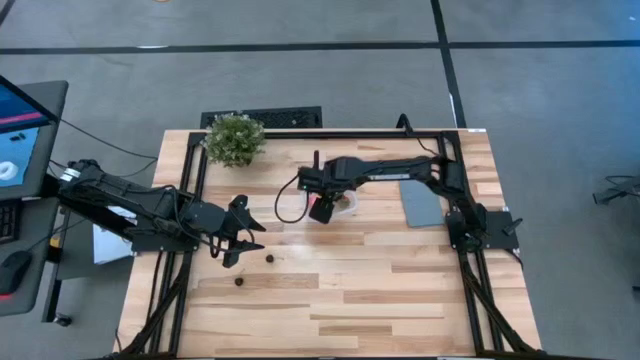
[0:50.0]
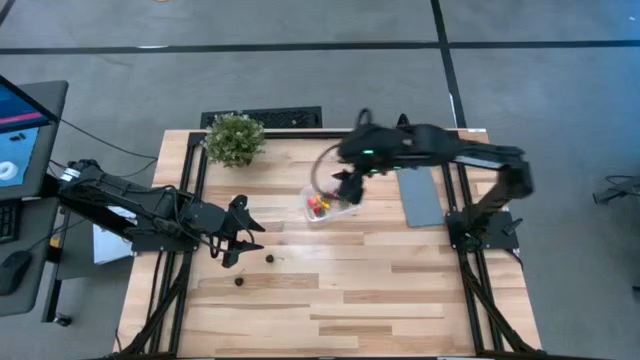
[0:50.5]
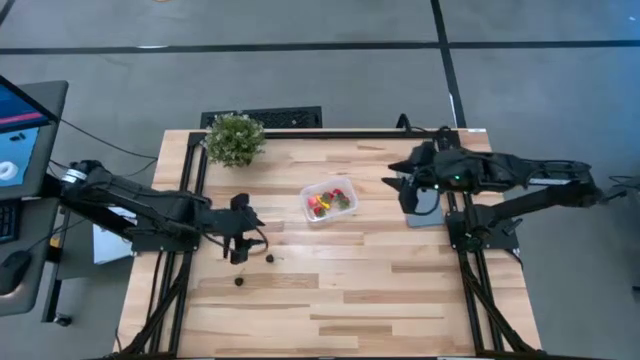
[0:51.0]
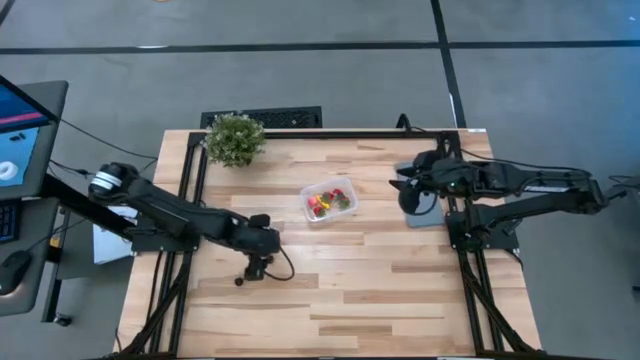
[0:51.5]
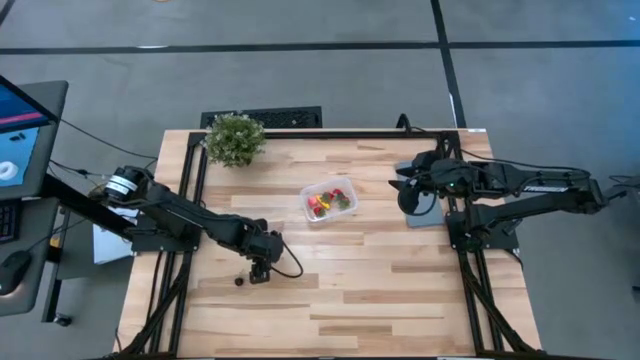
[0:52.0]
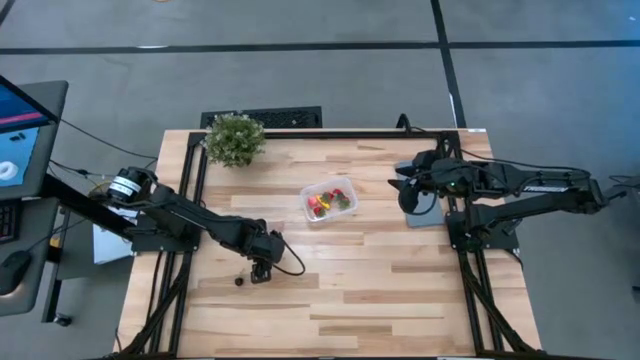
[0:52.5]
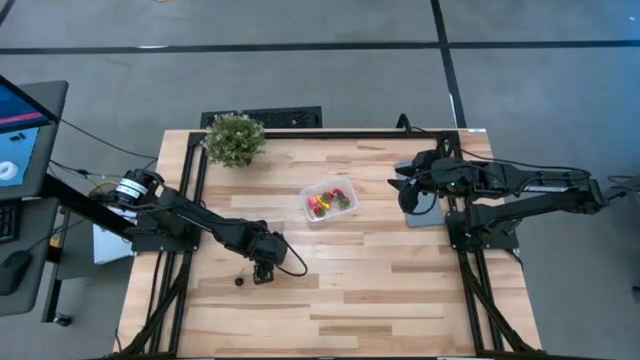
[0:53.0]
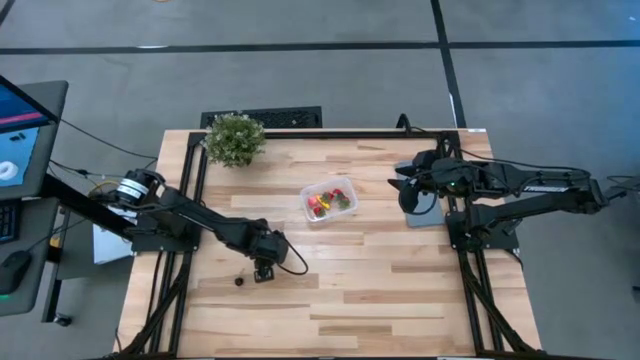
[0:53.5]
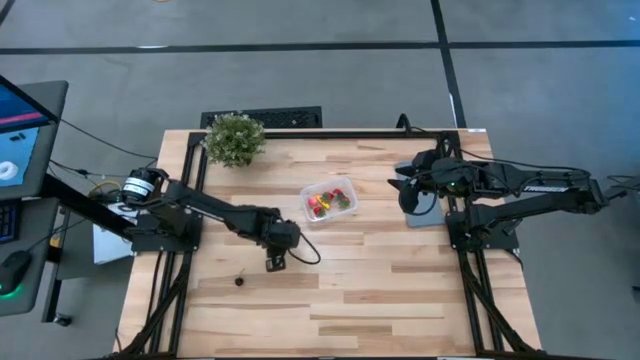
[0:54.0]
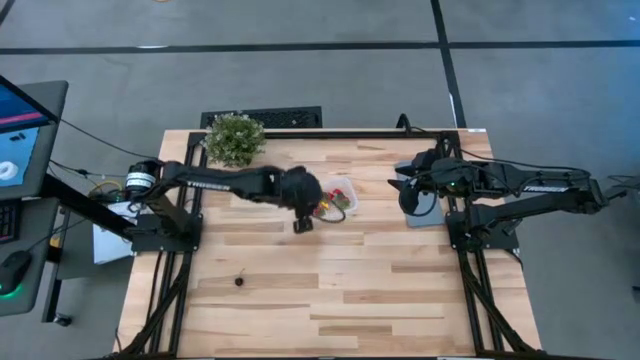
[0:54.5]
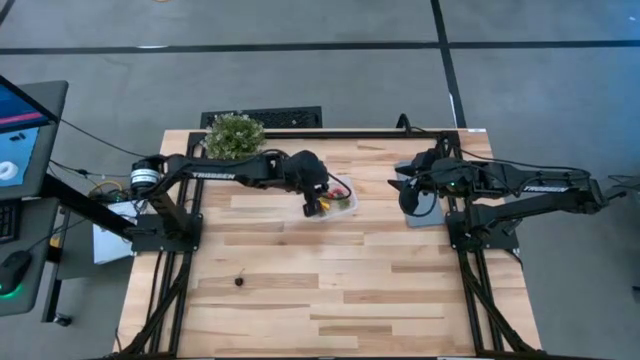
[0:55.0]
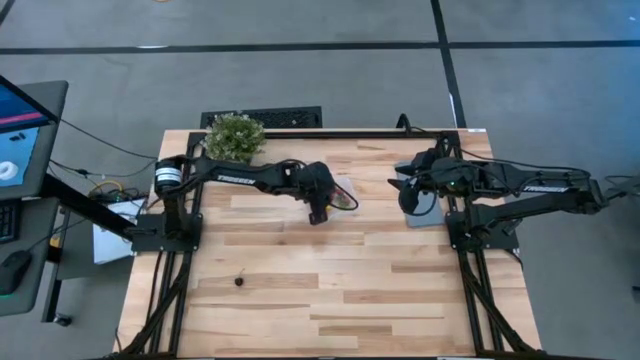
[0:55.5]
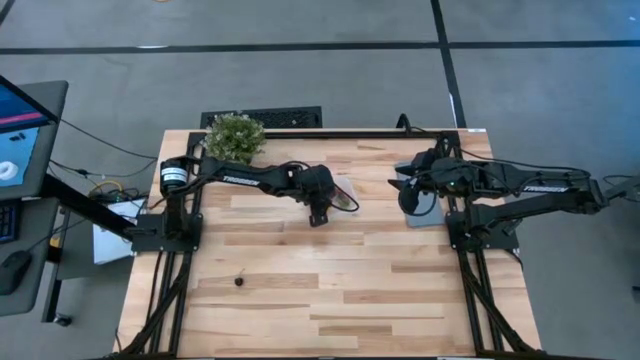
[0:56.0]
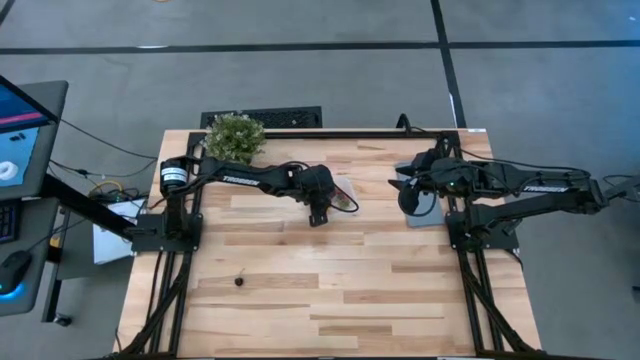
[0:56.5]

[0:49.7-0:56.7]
Task: Pick and placing Produce into tupperware
Put the black cherry into the transparent bin

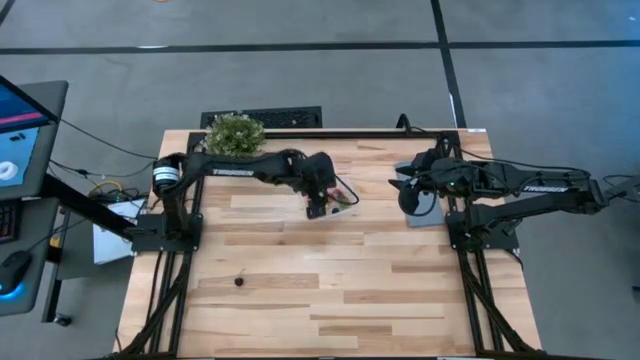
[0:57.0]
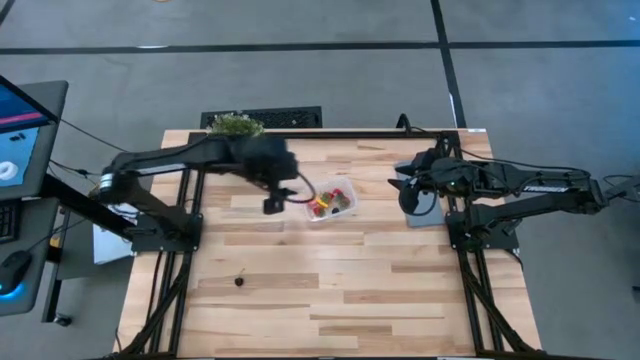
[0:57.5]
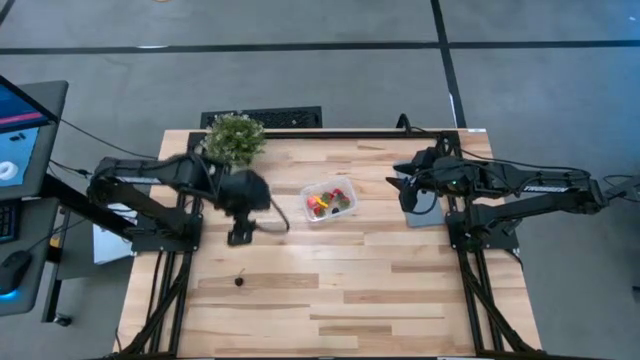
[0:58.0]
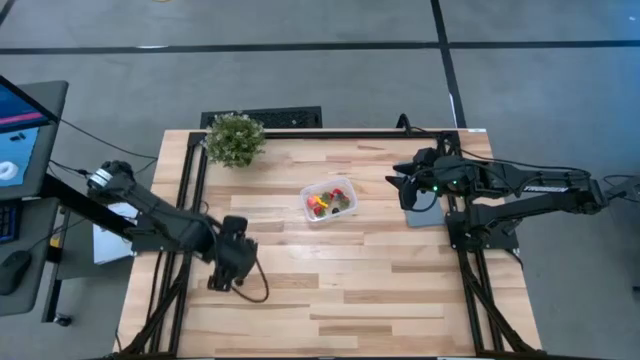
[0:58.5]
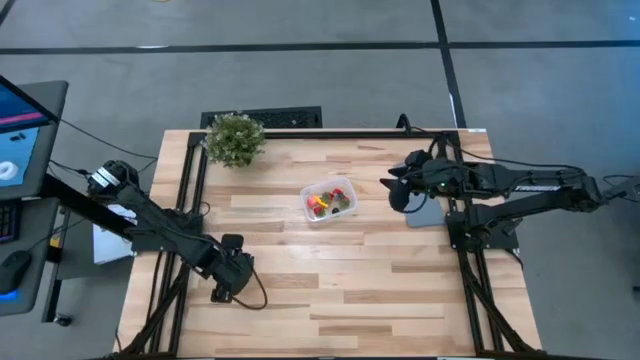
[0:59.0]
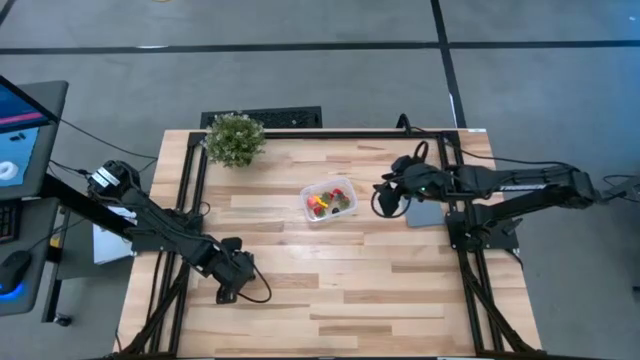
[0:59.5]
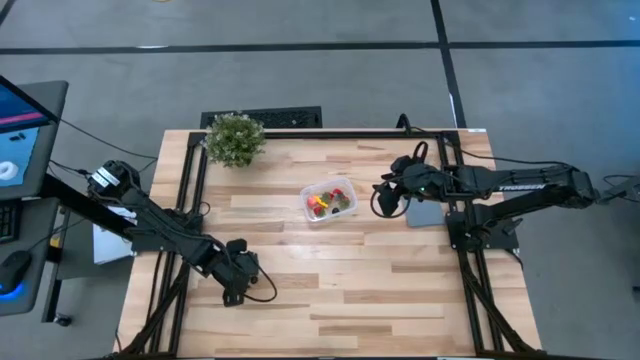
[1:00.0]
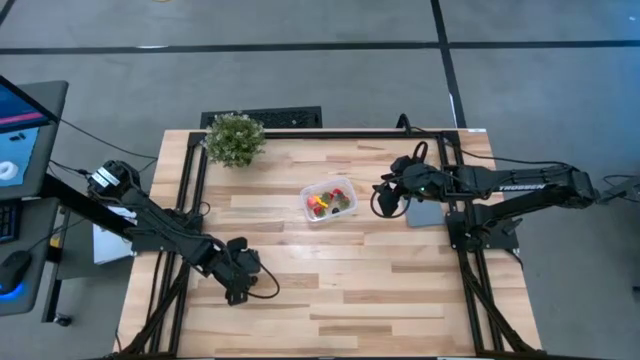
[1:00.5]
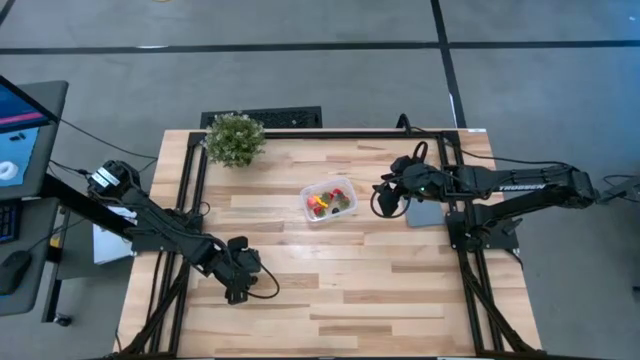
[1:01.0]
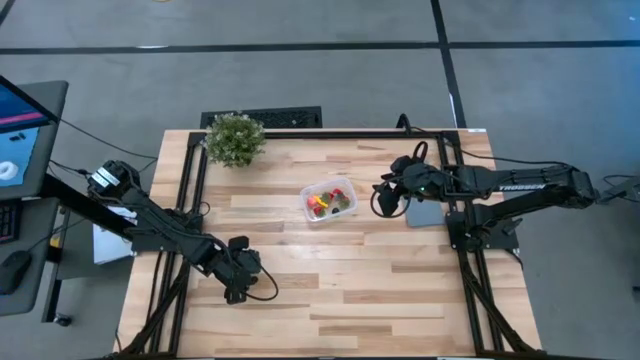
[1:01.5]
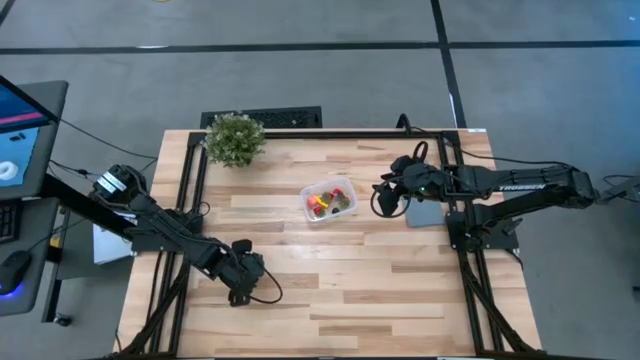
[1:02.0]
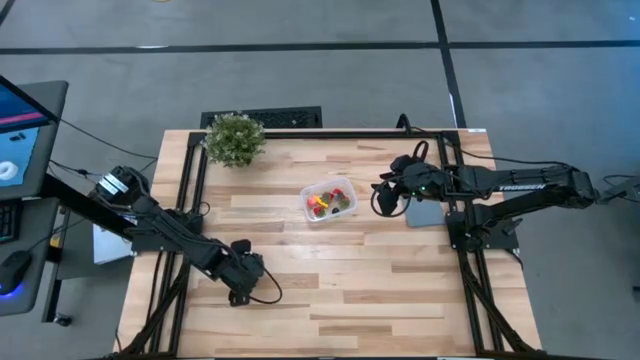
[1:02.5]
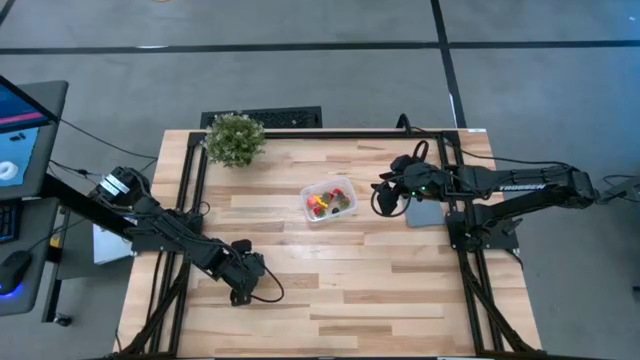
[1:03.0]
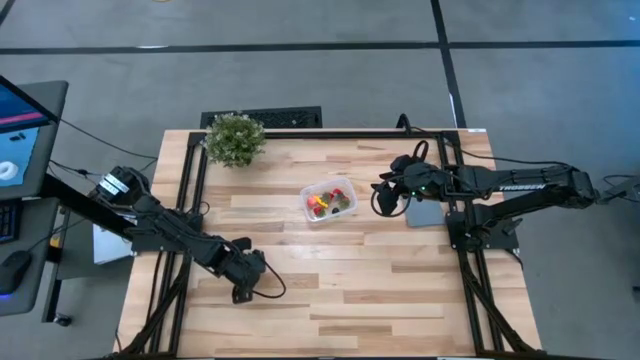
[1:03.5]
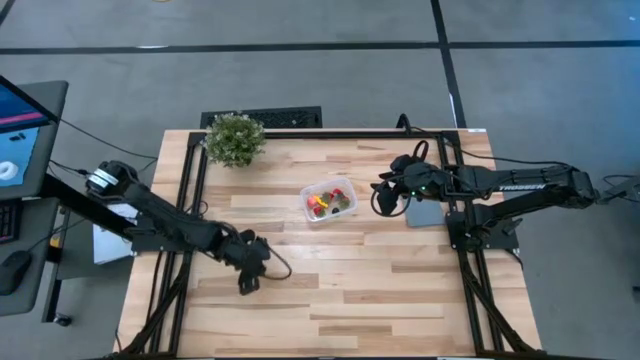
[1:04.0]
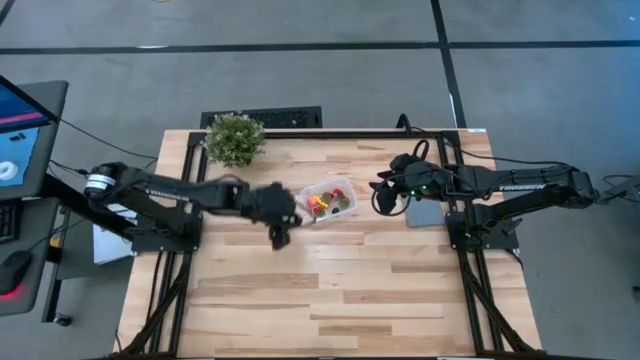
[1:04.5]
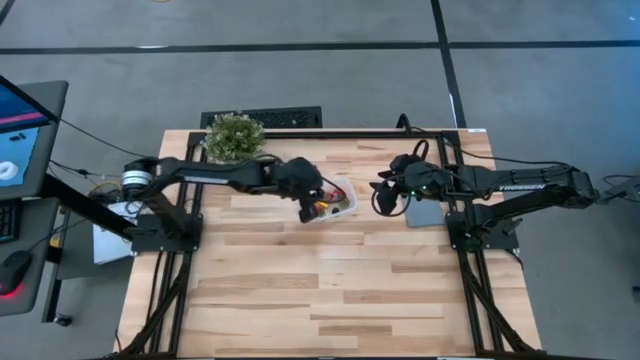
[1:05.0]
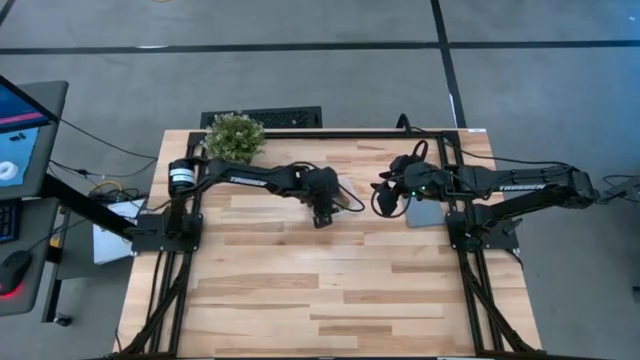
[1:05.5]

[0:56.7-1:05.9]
Put the black cherry into the transparent bin

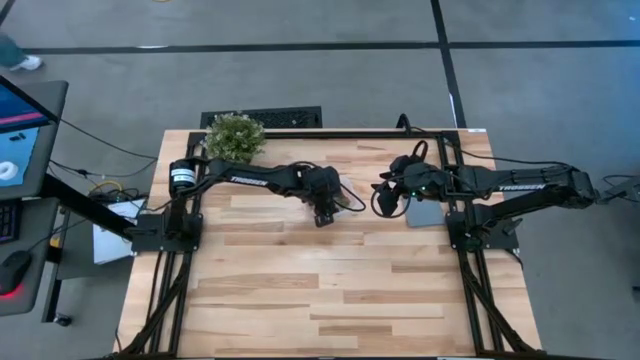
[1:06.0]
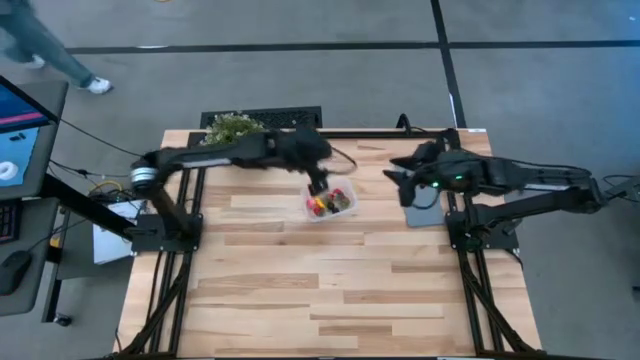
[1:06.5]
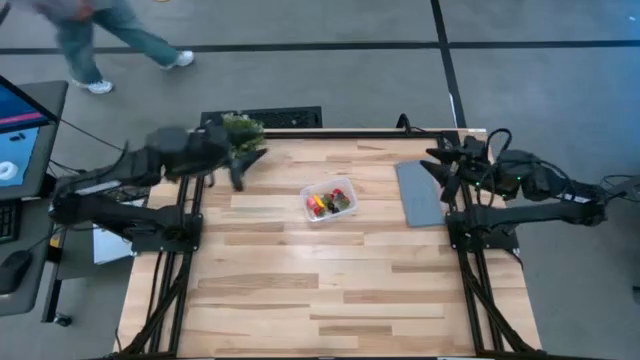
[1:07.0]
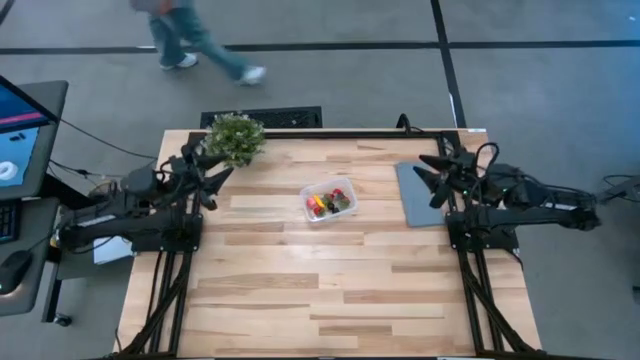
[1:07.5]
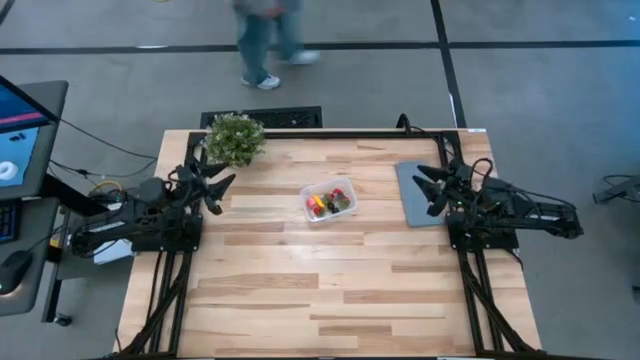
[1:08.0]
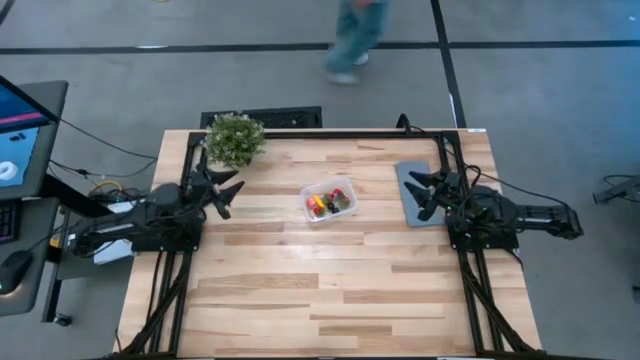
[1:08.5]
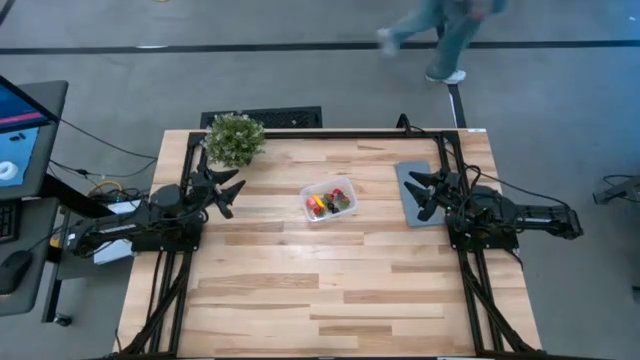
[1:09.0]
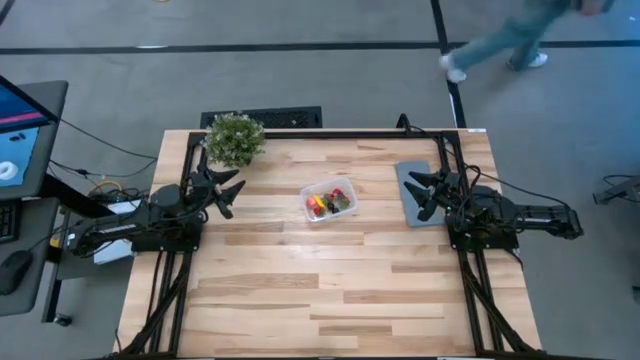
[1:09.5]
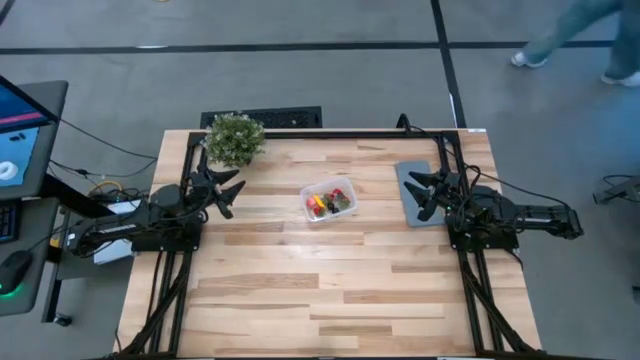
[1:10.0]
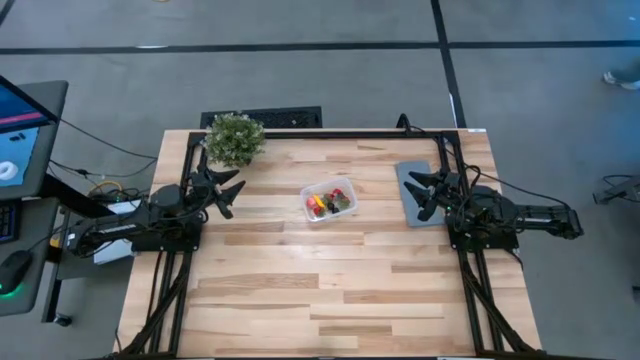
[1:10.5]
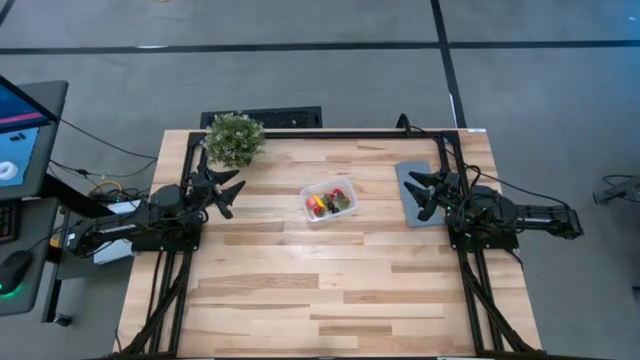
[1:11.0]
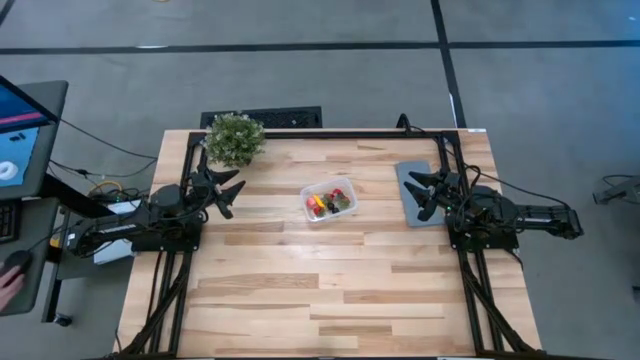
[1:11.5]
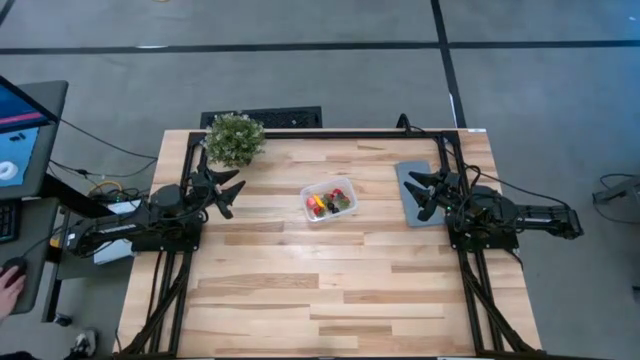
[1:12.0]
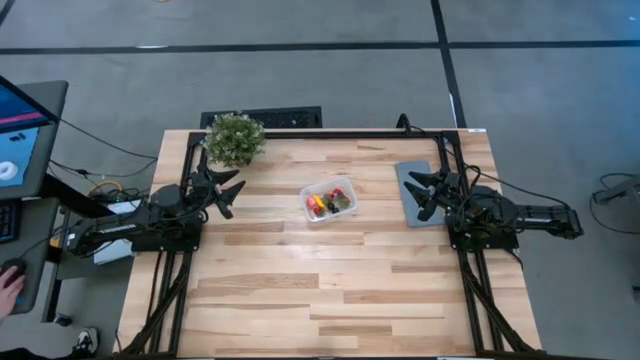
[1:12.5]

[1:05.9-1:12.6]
Return to Home Position
